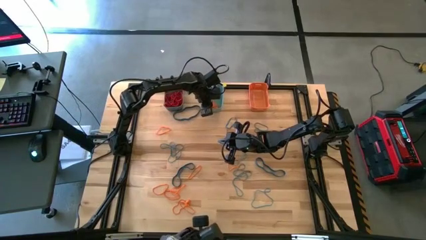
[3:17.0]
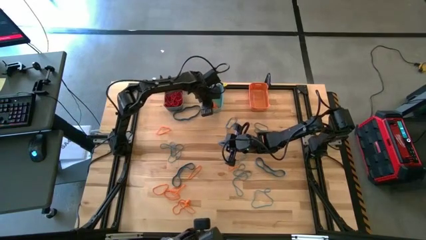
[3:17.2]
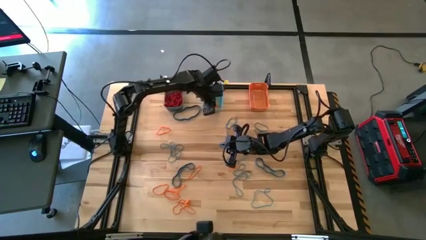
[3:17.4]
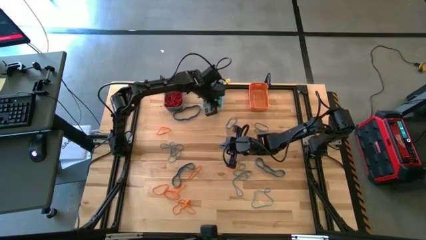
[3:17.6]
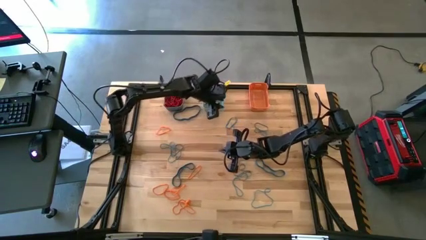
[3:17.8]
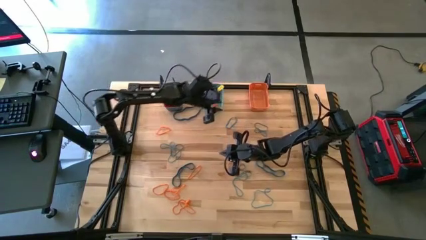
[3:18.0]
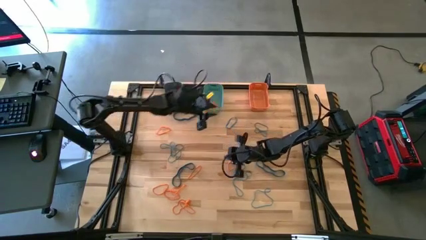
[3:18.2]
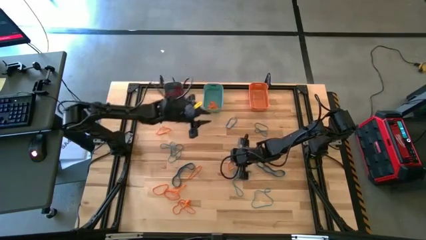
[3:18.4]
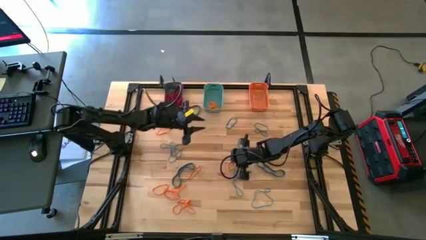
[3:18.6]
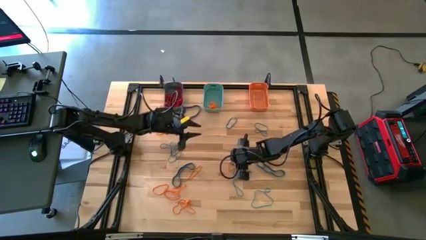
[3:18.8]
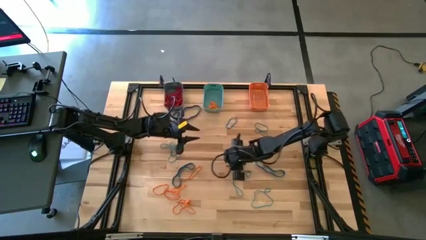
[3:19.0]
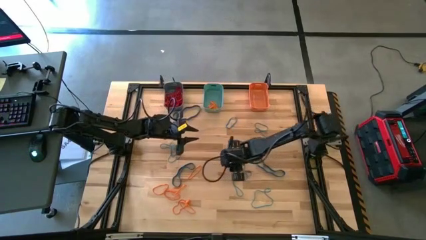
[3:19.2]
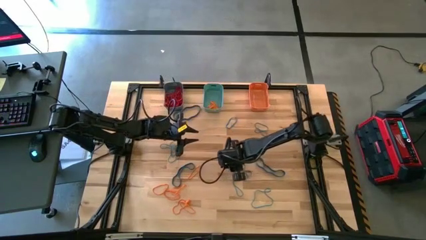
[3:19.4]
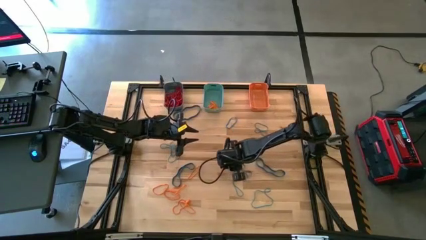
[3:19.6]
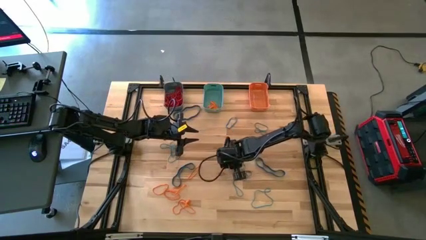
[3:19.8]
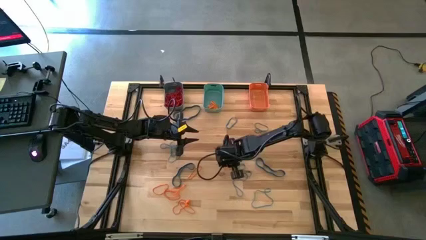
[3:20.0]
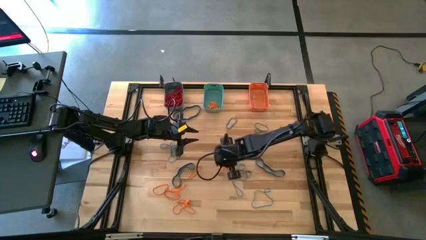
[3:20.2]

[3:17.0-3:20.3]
Task: Sort rubber bands into baskets
Put the orange rubber band into the green bin

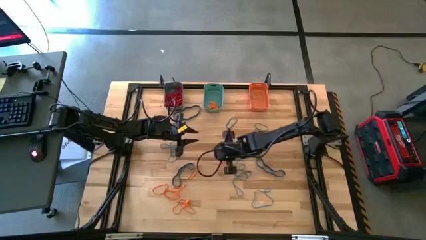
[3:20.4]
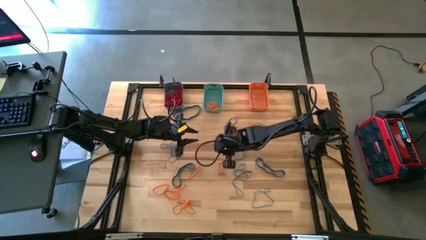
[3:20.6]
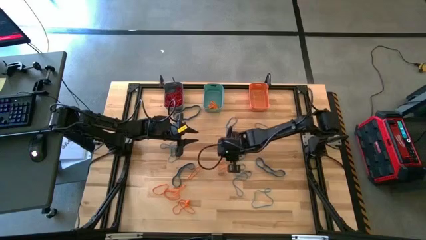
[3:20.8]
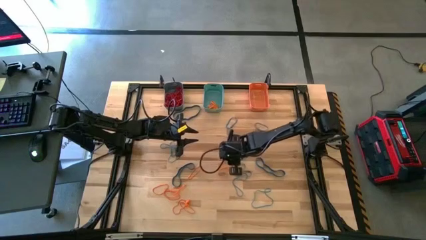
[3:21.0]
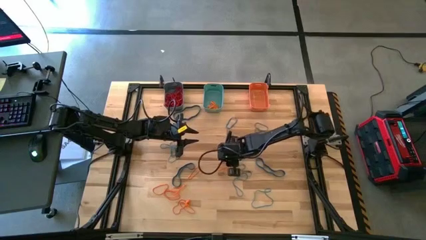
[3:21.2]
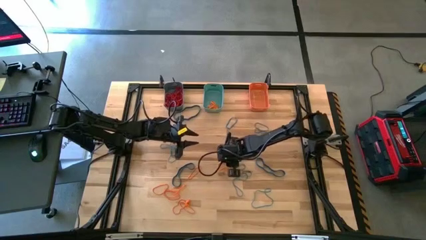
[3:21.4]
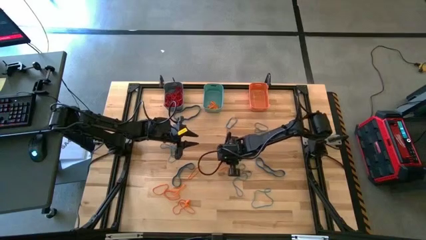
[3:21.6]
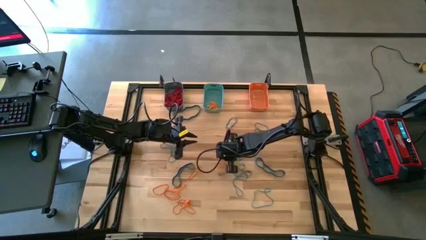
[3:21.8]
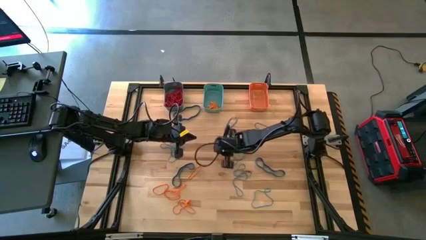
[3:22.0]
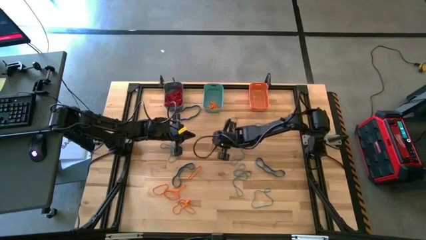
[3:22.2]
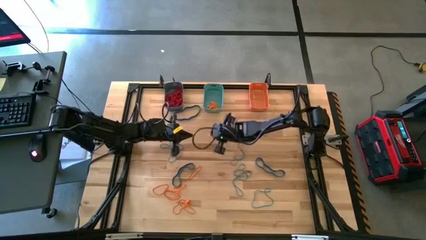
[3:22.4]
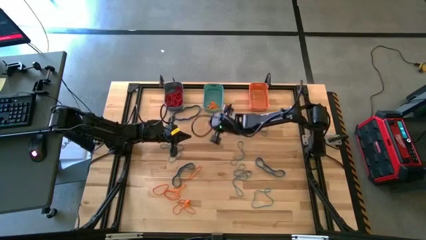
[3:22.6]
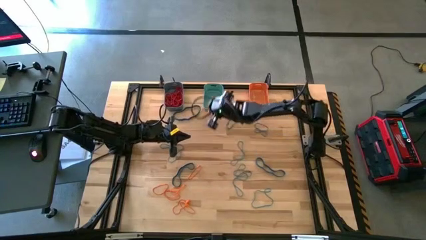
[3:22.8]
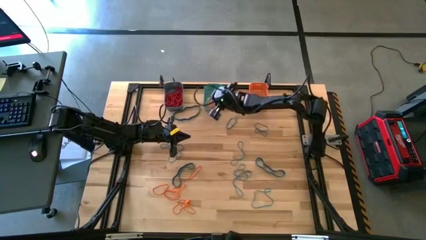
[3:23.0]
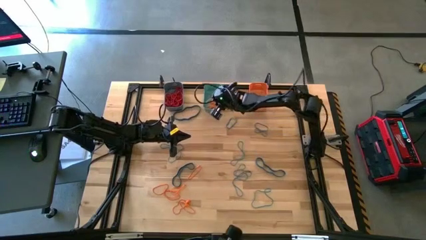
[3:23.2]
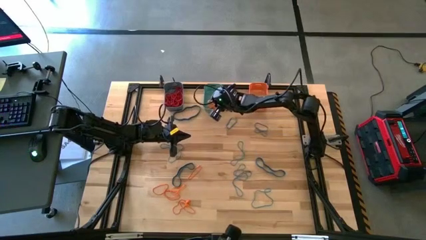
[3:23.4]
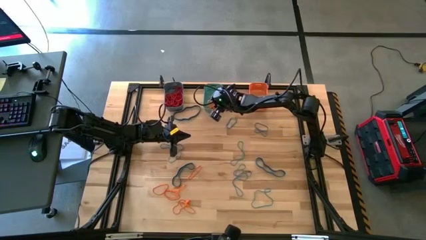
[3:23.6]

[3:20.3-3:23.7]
Put the orange rubber band into the green bin

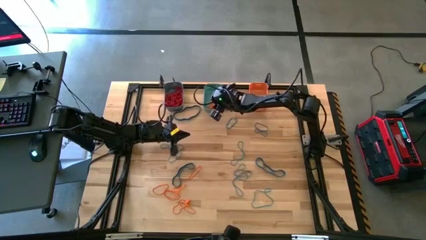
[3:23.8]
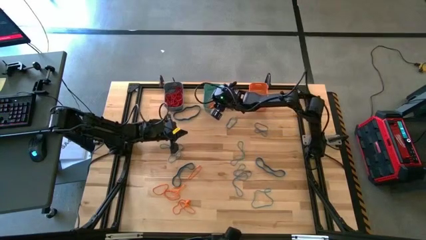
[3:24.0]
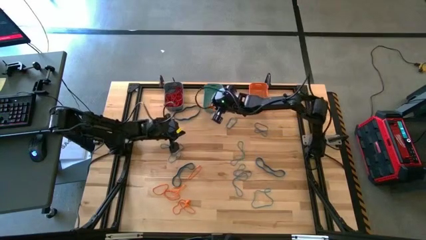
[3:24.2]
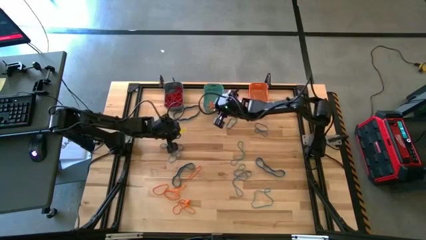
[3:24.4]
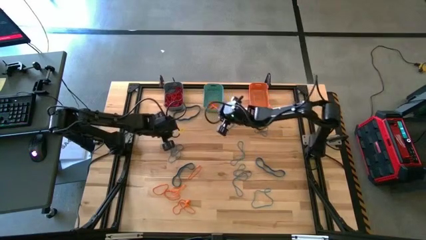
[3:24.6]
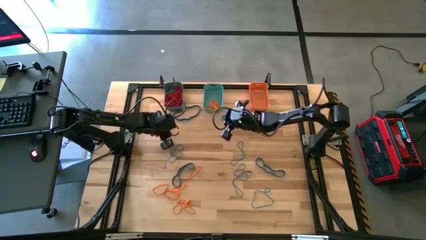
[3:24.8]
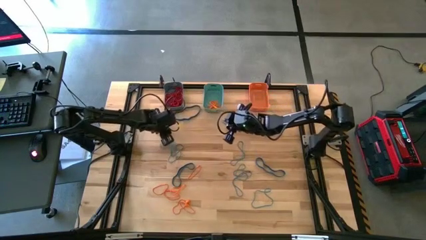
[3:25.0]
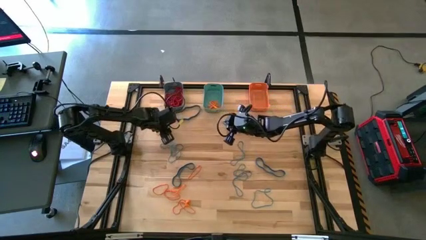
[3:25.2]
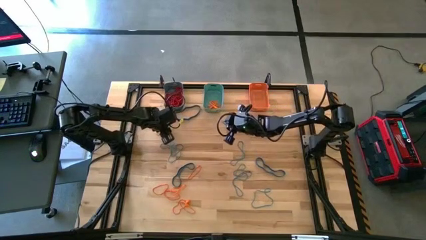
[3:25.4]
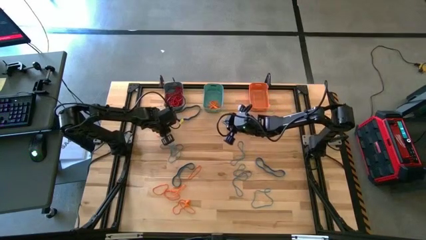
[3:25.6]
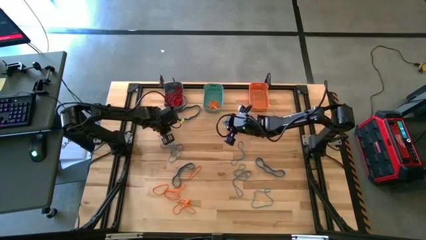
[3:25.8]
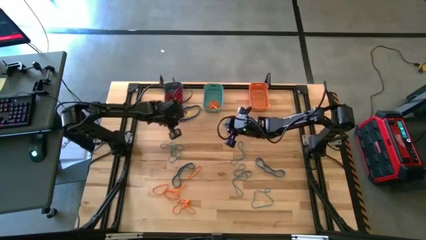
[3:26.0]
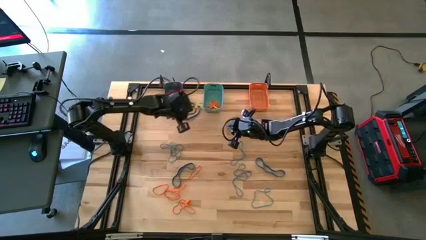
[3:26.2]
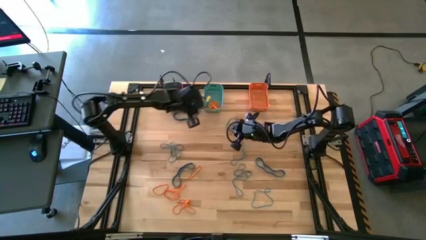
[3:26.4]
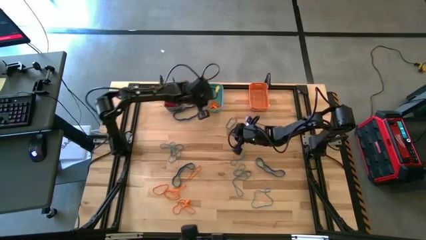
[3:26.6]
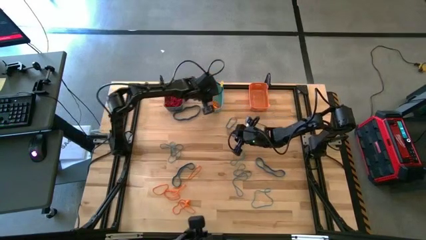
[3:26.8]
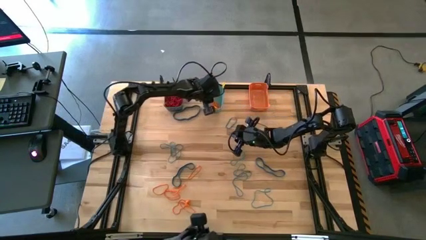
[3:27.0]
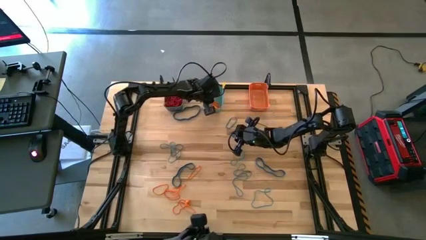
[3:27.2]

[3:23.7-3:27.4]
Put the orange rubber band into the green bin

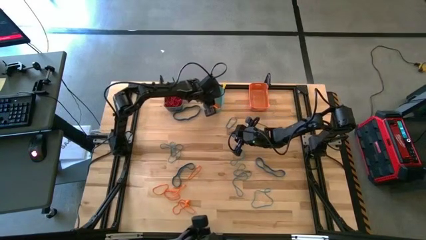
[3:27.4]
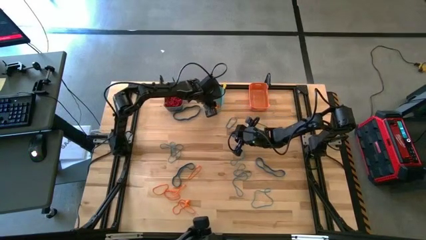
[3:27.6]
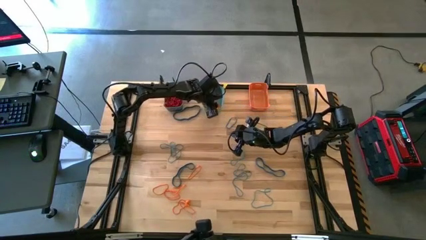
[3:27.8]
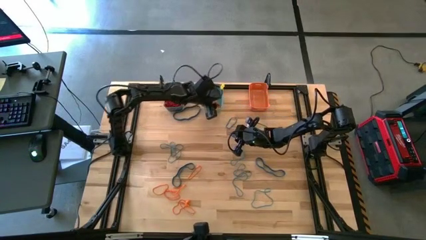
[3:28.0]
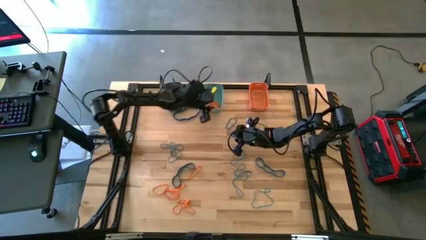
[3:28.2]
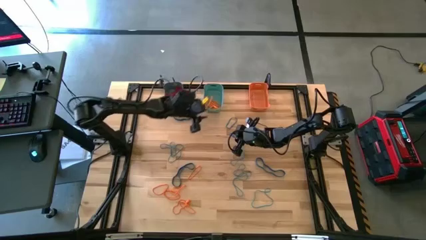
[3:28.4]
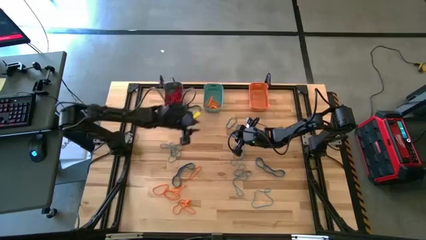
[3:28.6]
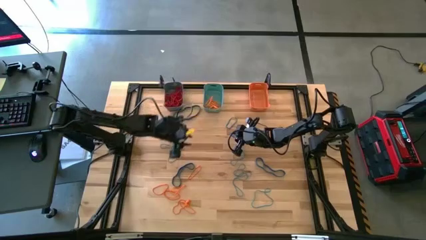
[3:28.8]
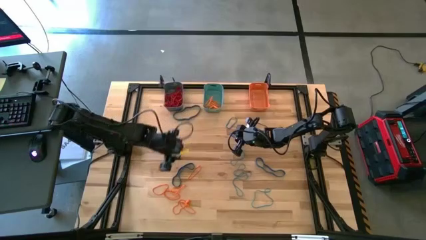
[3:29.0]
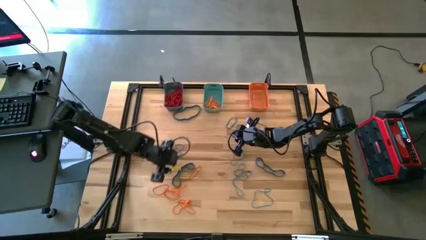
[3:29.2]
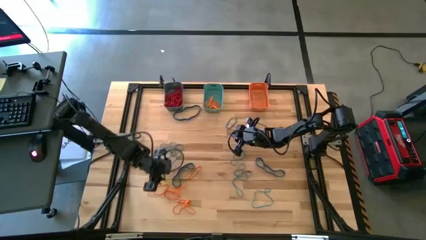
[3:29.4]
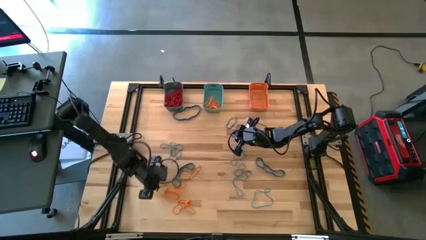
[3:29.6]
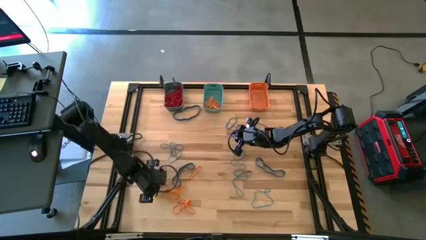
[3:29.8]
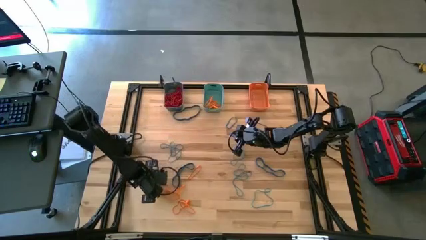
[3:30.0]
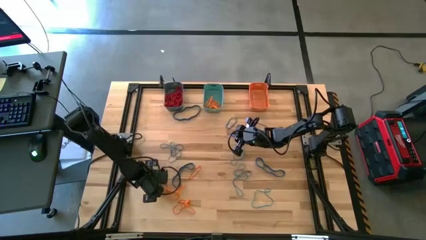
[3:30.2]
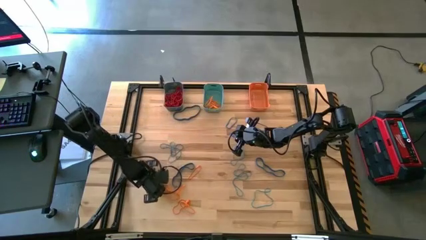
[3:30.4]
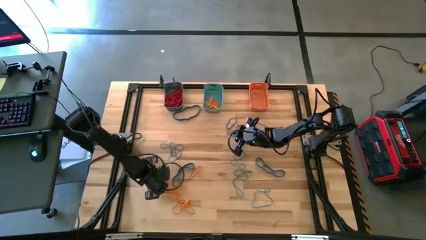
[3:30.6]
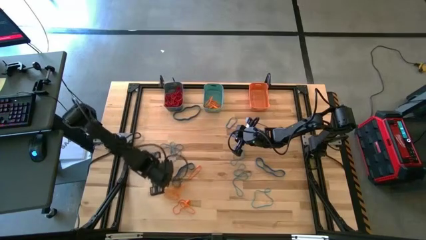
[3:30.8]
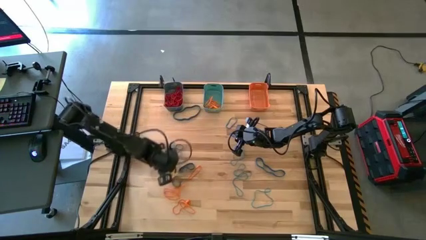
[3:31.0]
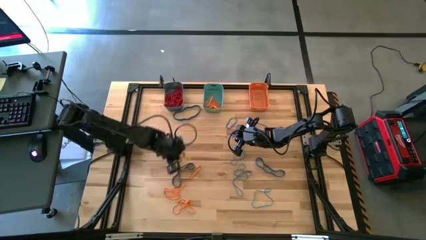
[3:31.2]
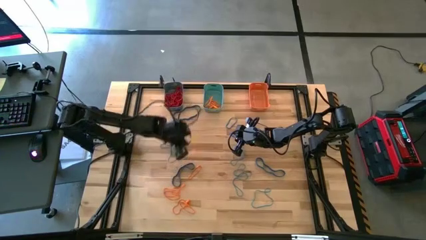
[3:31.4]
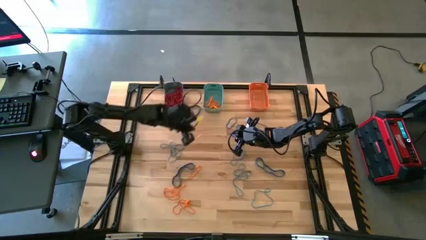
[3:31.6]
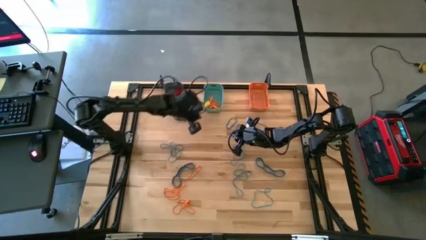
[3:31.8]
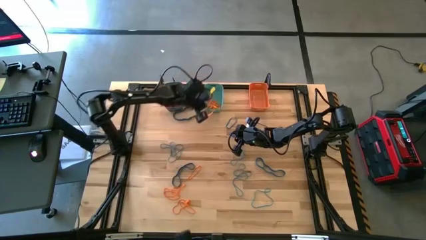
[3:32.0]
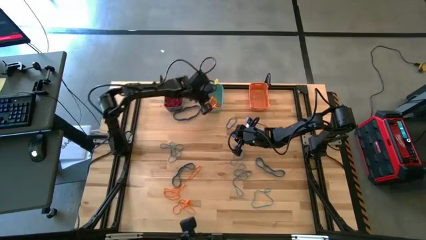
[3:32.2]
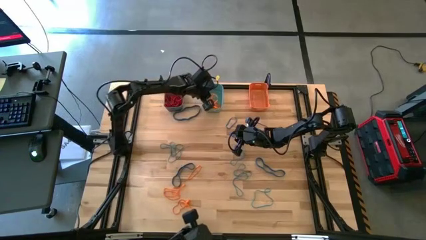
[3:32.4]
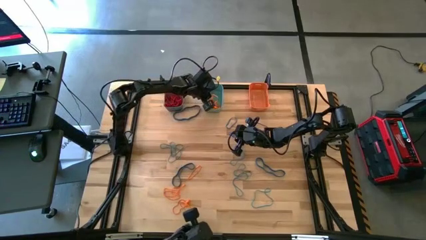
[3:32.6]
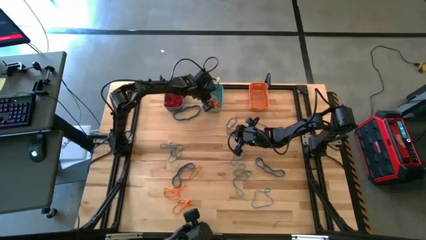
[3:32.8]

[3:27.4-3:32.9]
Put the orange rubber band into the green bin
